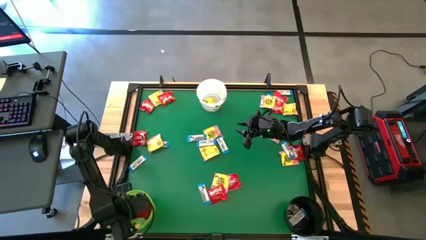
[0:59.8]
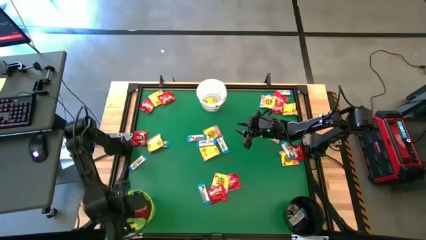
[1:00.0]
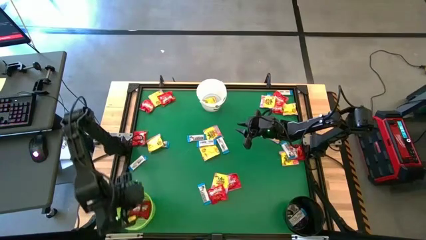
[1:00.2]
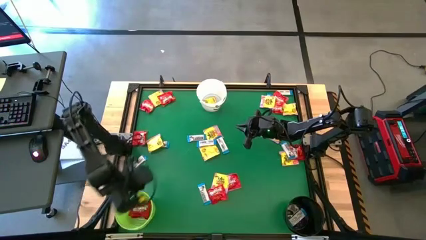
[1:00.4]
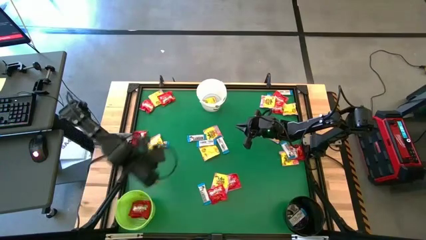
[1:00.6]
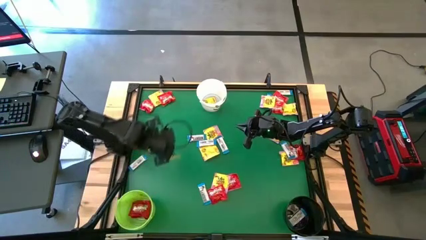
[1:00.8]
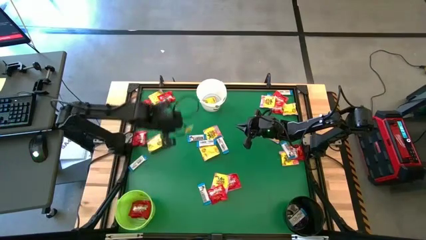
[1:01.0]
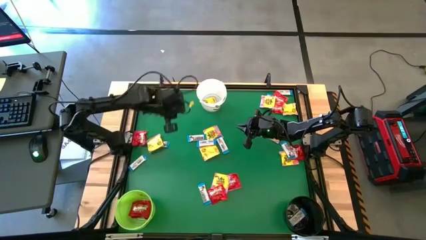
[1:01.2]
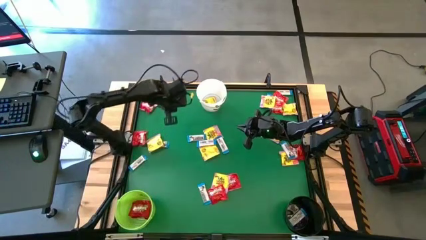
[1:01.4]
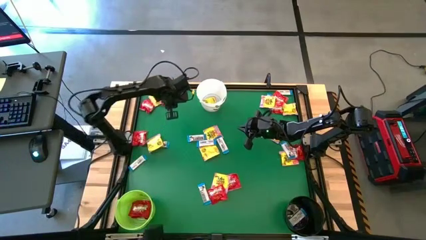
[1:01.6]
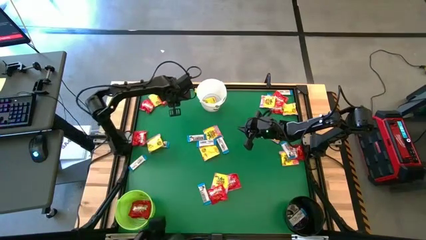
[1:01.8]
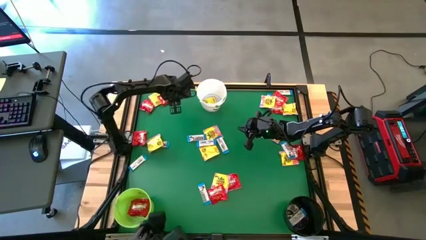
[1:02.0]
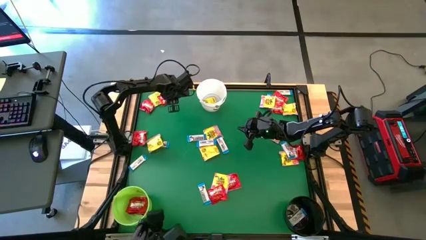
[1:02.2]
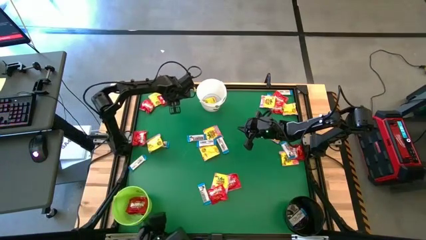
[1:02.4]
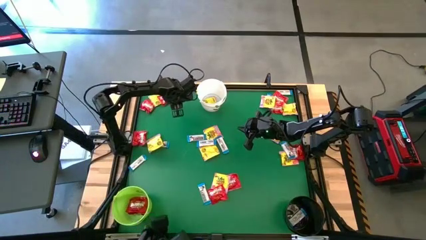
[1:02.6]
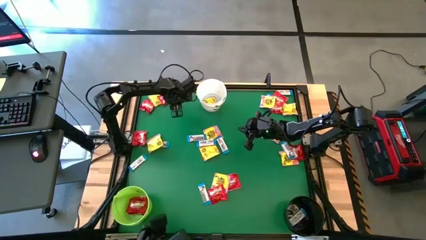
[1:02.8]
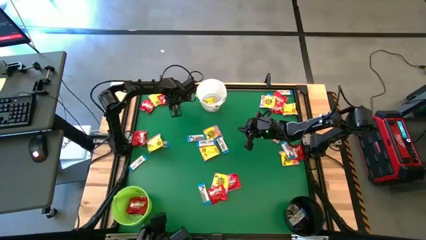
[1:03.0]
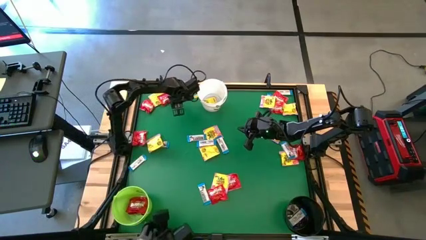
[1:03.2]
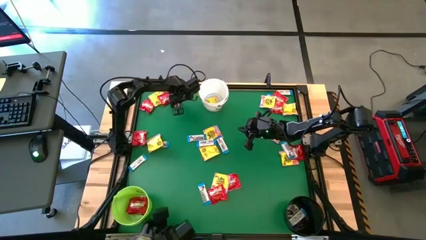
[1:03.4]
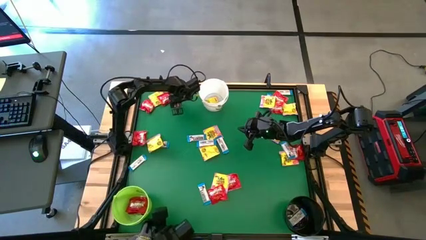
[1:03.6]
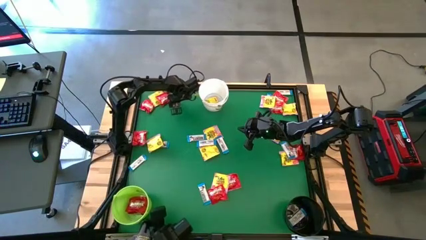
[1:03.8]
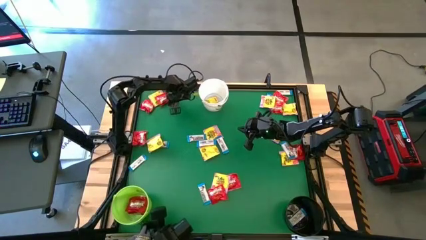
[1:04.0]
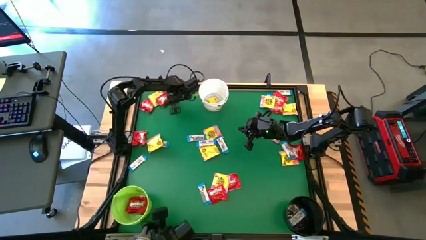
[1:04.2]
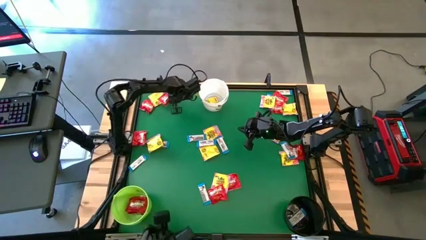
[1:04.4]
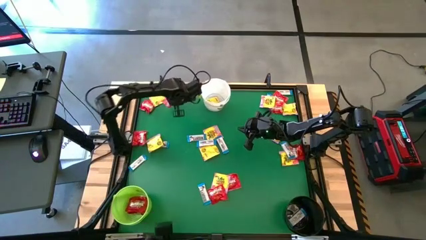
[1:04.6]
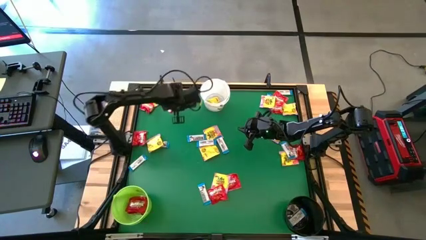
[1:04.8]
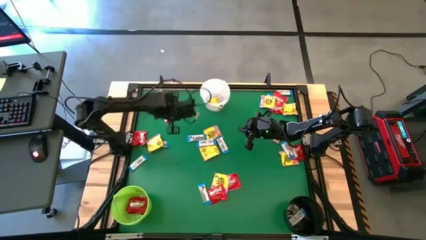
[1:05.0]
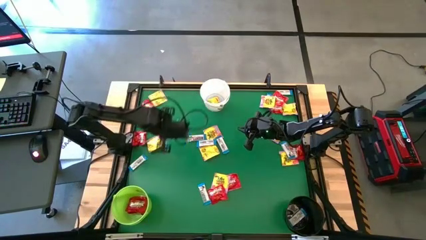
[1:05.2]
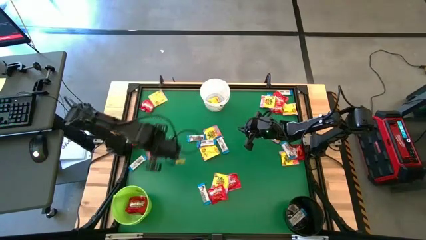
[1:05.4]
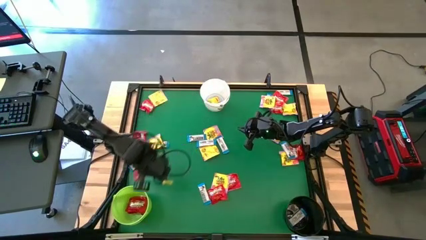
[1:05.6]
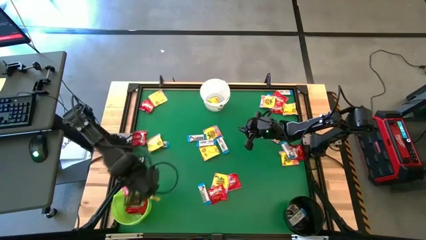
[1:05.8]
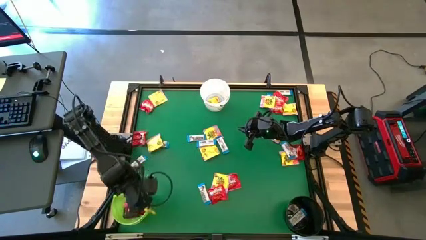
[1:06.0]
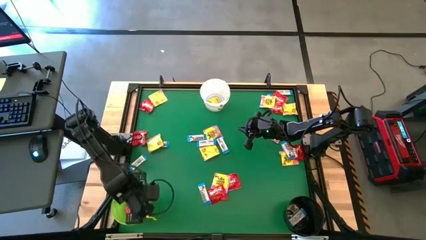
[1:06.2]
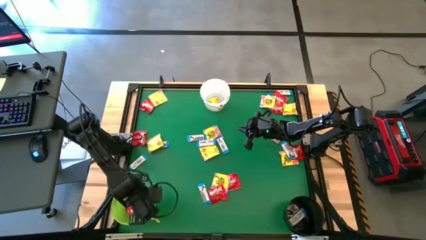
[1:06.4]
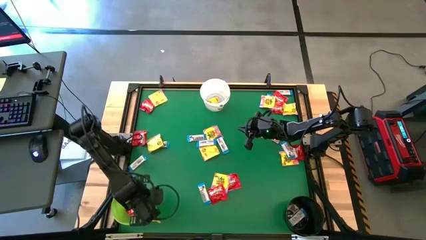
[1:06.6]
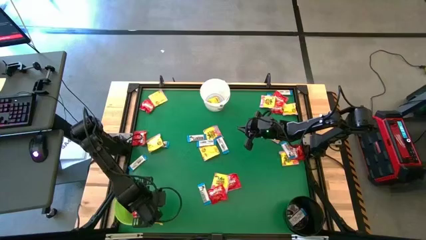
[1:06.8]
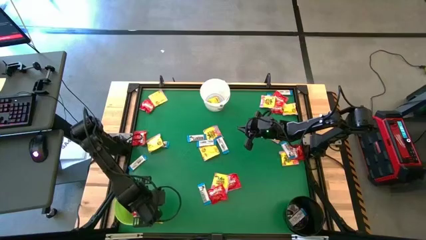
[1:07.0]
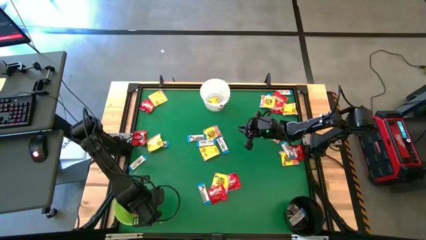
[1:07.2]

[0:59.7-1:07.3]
Task: Sort candy by brand, put in halloween buckets
Put the red candy into the green bucket

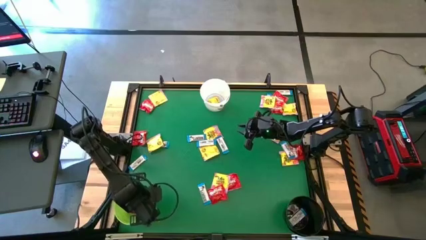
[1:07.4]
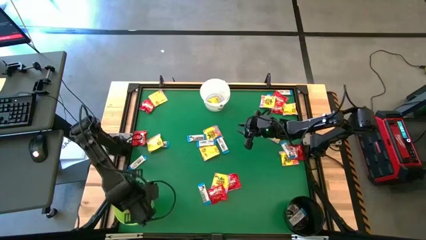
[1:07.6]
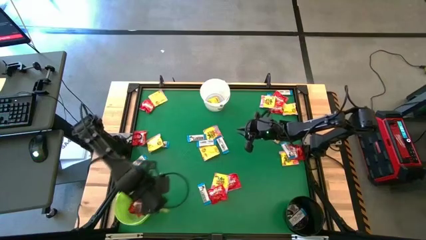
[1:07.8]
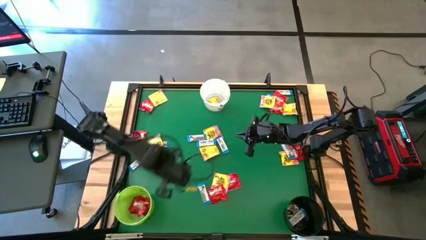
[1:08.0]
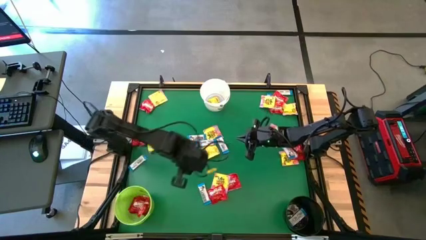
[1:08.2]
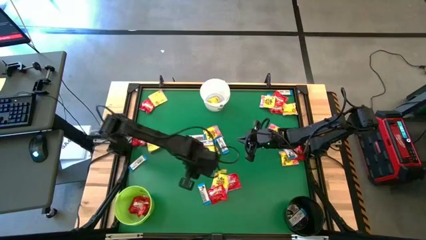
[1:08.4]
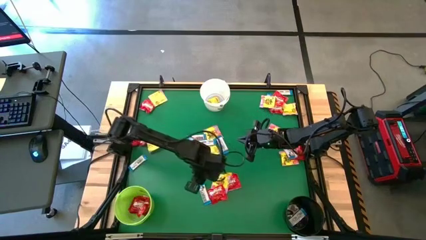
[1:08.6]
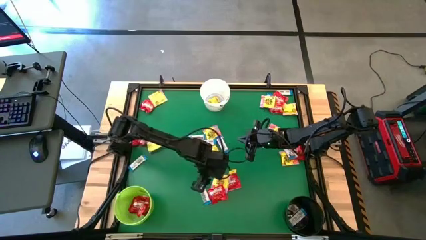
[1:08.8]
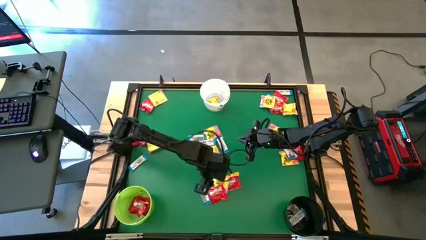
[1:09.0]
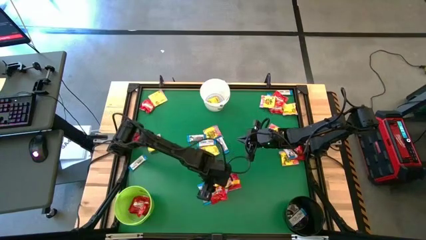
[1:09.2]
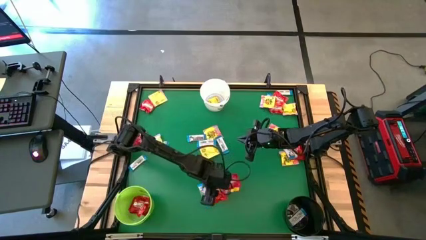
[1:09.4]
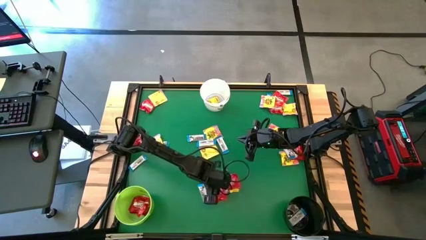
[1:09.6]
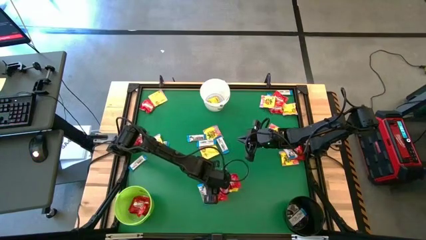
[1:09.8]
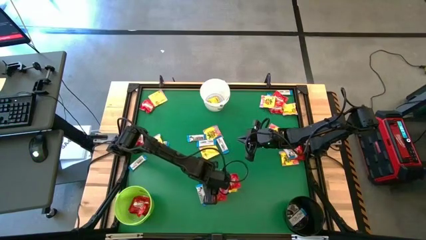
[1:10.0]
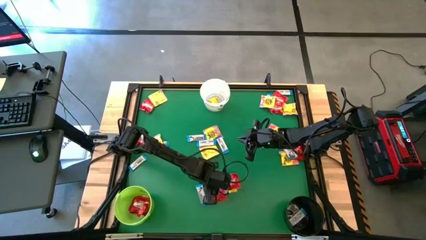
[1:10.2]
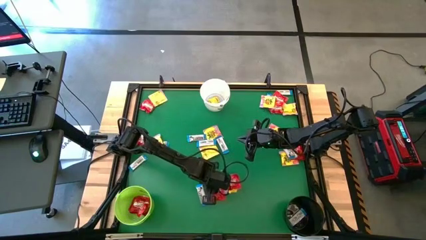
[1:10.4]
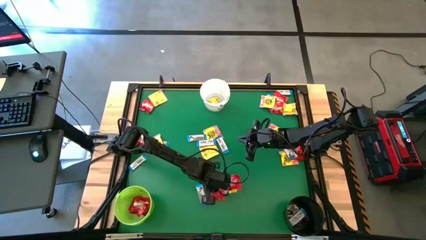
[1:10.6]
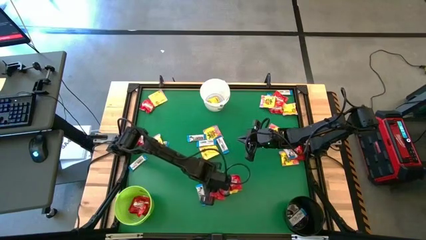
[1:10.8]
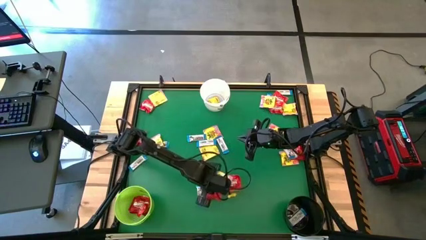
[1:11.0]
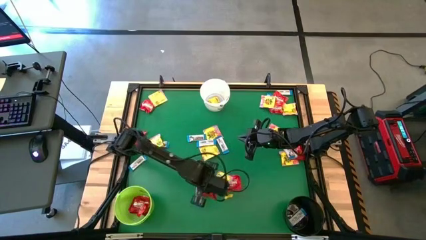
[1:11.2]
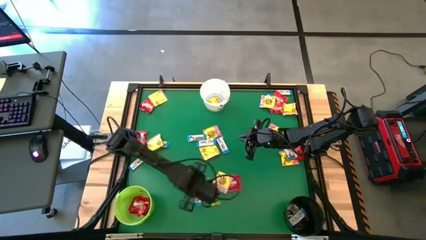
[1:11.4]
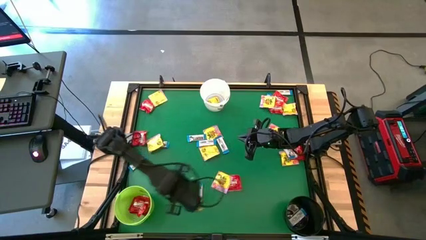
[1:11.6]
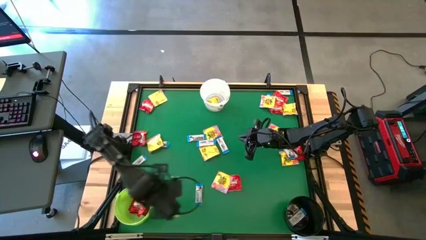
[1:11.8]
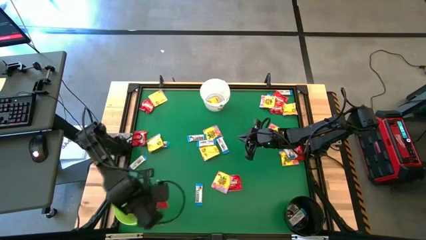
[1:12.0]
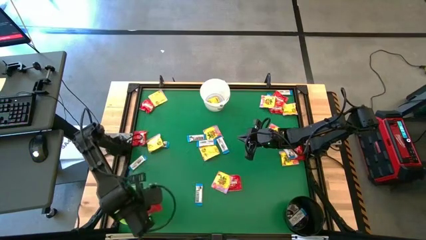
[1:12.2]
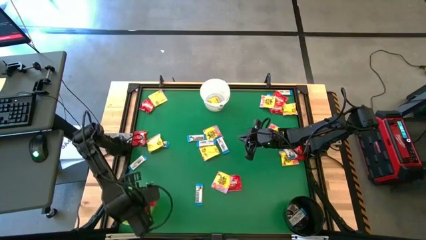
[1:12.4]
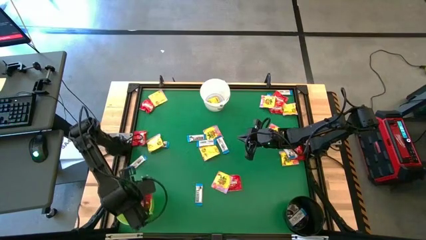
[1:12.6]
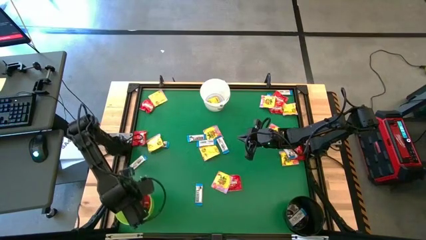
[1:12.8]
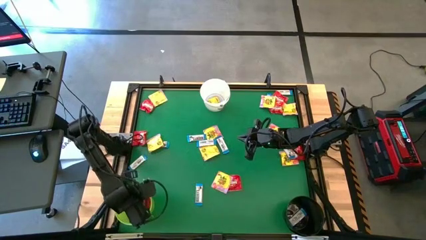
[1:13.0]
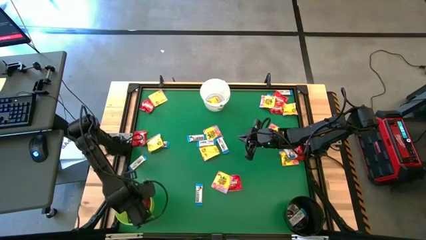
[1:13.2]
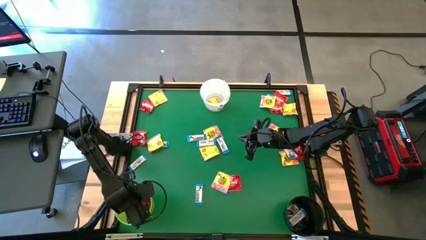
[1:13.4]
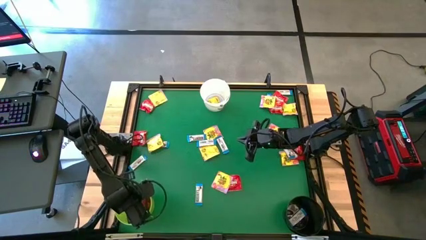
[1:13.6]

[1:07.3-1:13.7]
Put the red candy into the green bucket

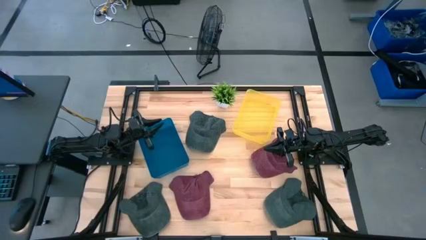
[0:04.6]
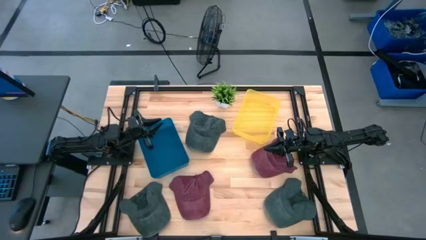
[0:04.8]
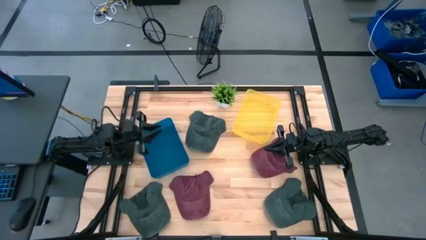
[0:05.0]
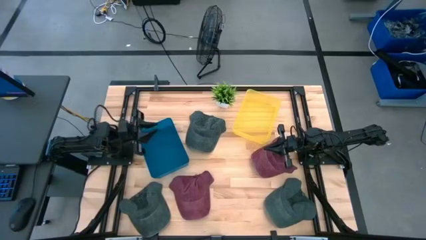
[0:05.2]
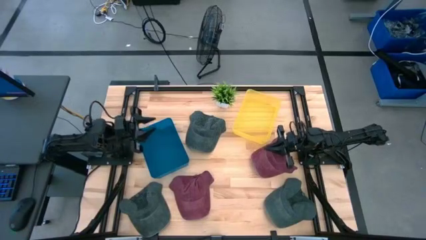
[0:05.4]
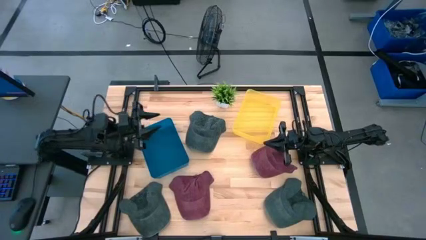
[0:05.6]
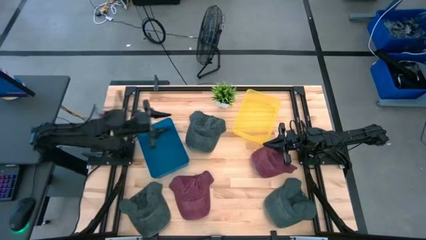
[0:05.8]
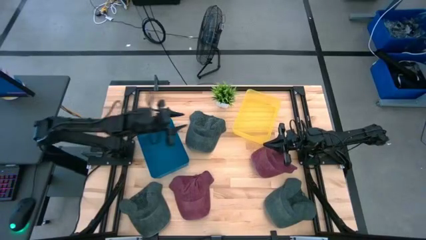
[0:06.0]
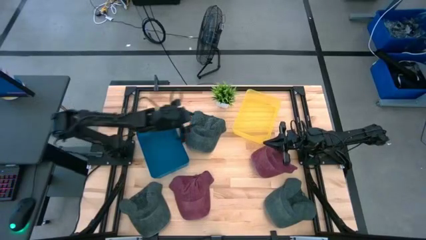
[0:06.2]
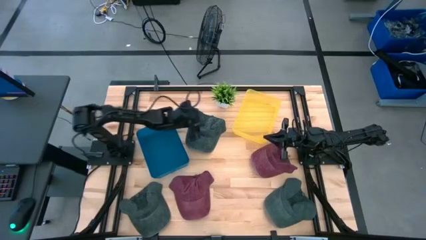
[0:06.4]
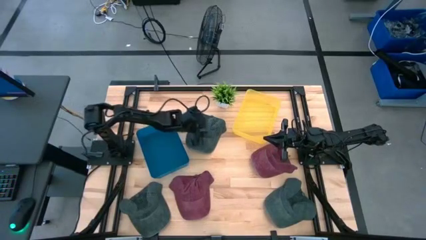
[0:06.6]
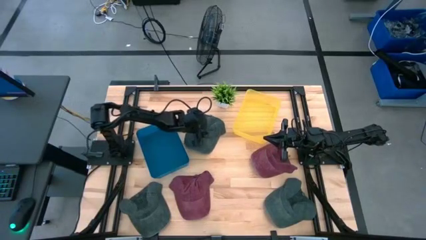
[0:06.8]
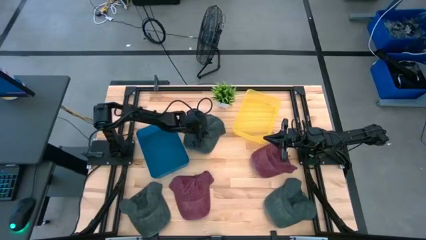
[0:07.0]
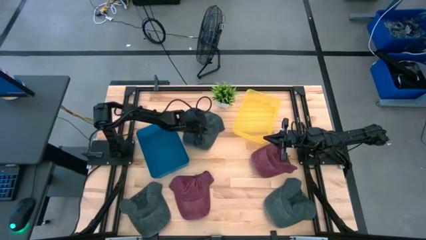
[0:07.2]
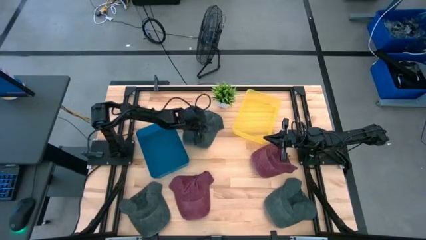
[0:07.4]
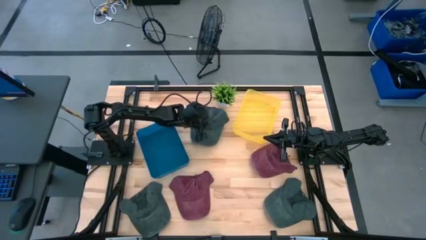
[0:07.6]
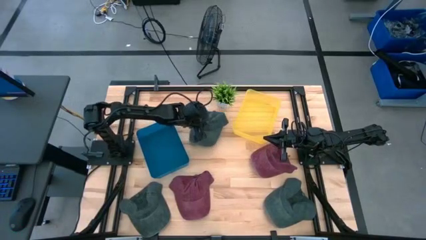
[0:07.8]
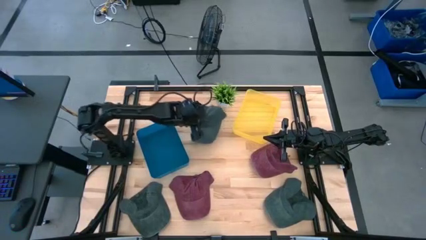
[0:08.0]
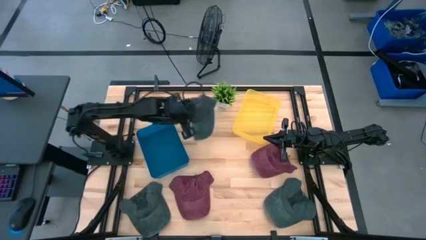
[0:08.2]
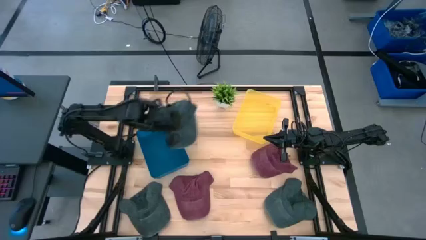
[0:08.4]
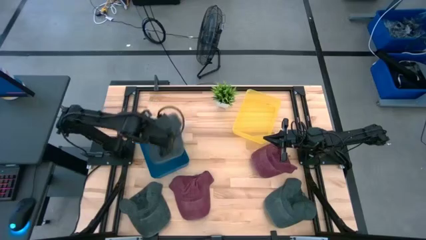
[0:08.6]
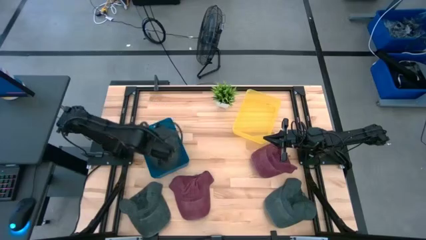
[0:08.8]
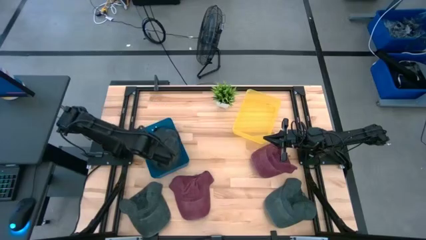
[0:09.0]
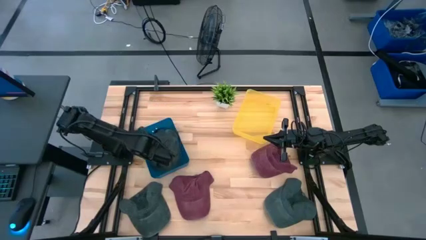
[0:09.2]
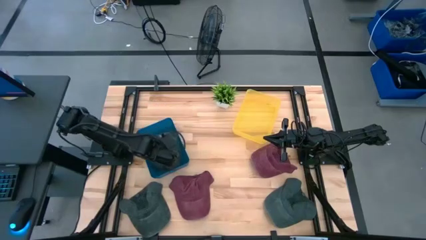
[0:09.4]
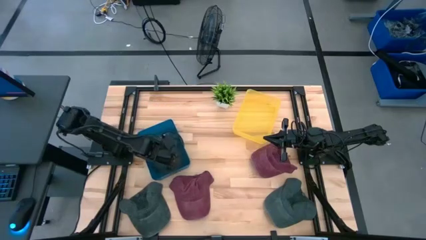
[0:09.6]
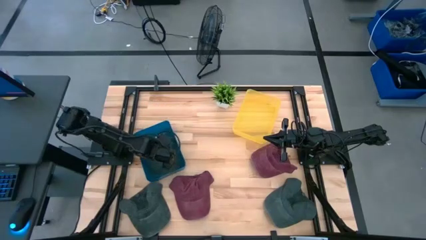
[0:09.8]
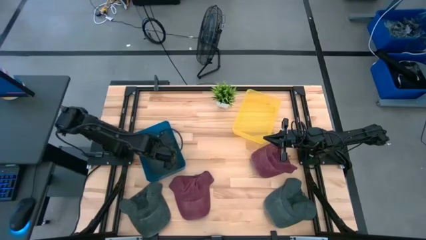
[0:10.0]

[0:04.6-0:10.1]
Task: Pick & Place hat
Put the top gray cap into the blue bin
